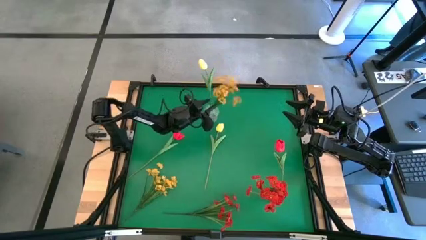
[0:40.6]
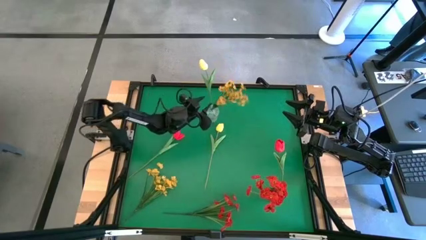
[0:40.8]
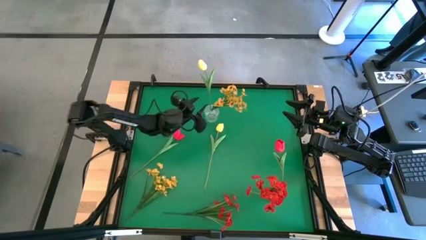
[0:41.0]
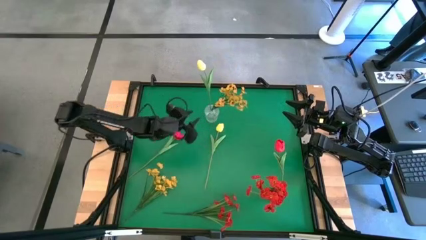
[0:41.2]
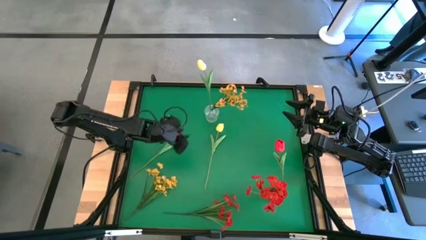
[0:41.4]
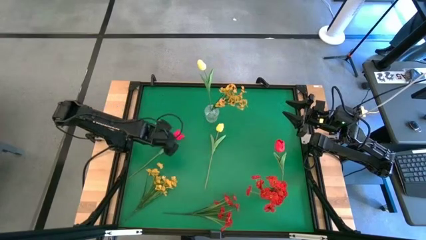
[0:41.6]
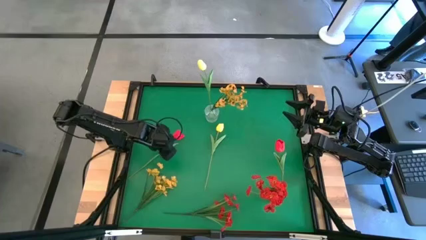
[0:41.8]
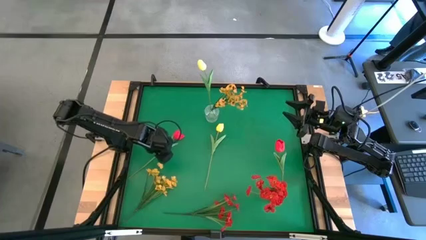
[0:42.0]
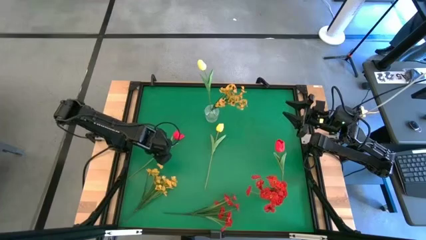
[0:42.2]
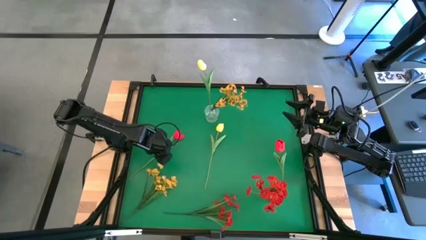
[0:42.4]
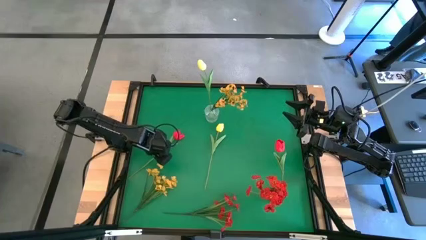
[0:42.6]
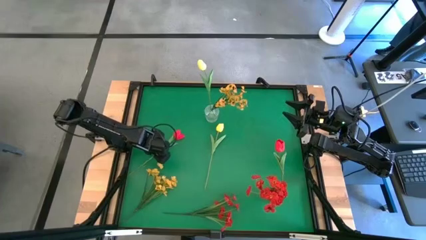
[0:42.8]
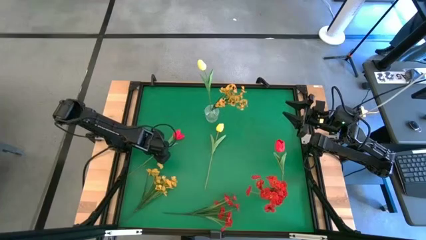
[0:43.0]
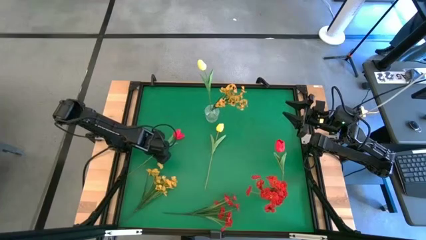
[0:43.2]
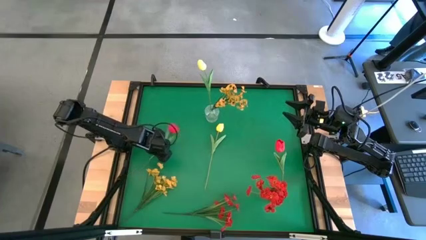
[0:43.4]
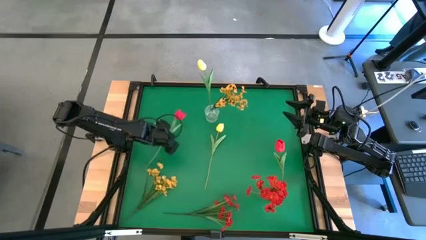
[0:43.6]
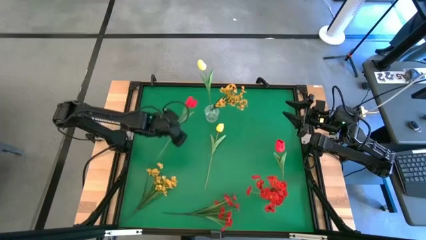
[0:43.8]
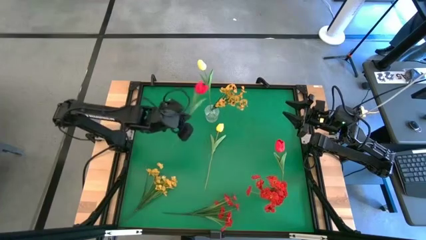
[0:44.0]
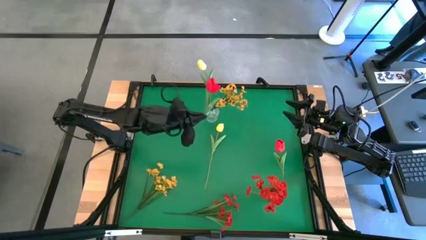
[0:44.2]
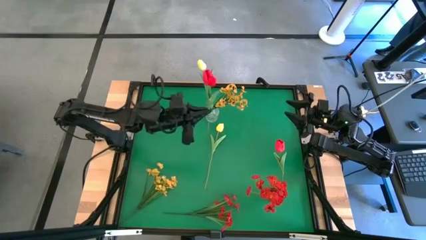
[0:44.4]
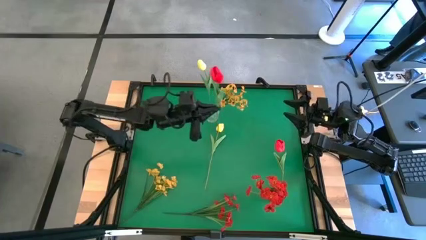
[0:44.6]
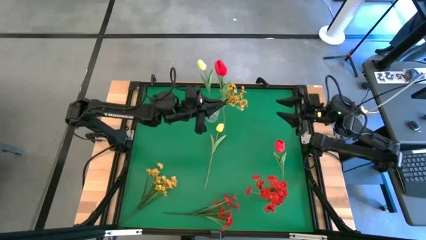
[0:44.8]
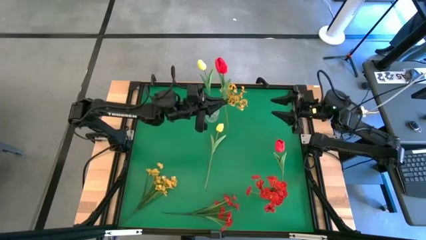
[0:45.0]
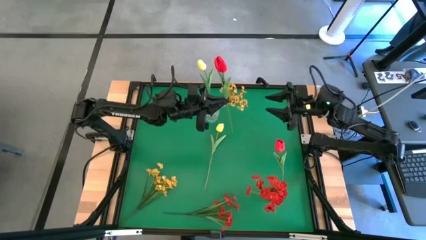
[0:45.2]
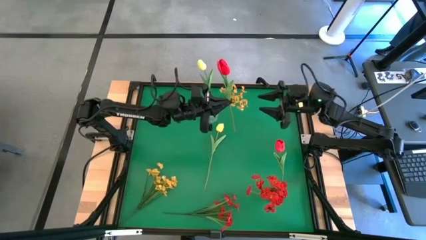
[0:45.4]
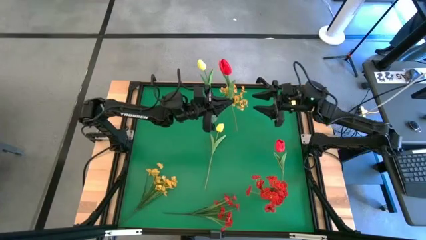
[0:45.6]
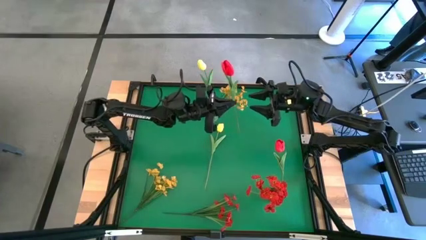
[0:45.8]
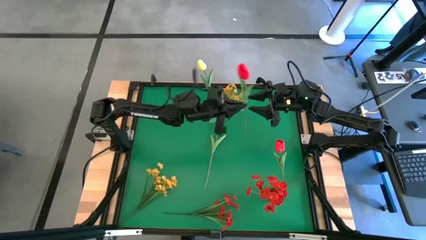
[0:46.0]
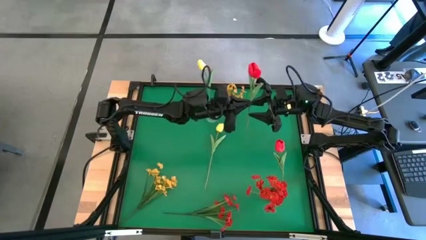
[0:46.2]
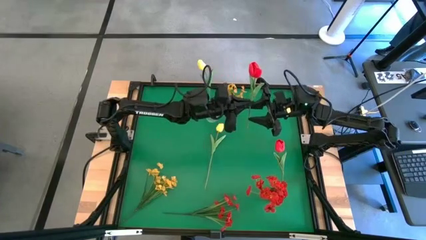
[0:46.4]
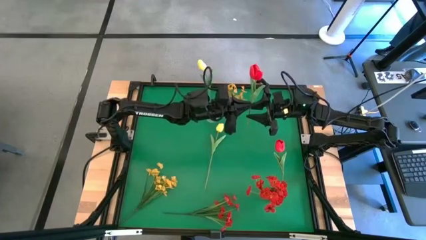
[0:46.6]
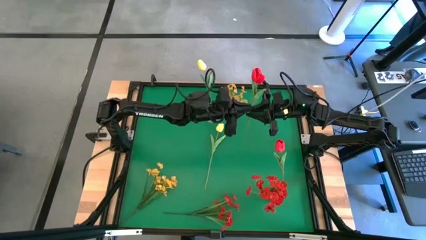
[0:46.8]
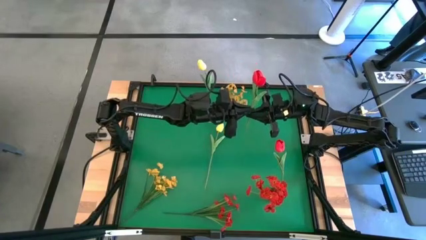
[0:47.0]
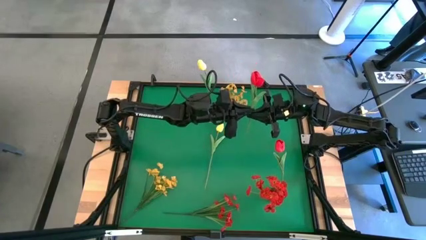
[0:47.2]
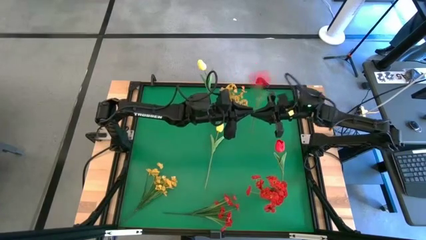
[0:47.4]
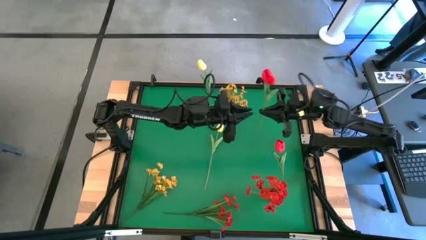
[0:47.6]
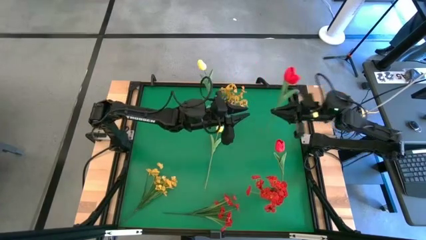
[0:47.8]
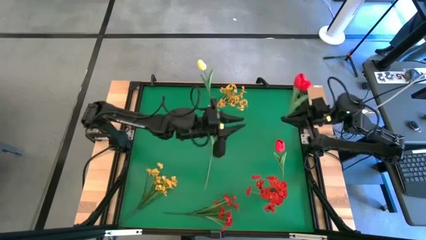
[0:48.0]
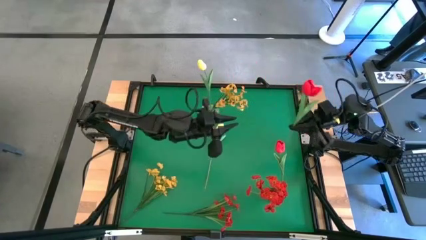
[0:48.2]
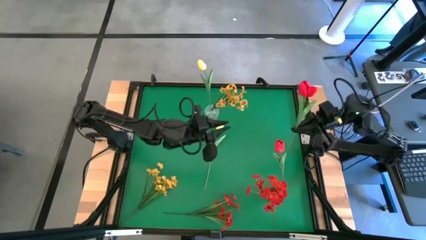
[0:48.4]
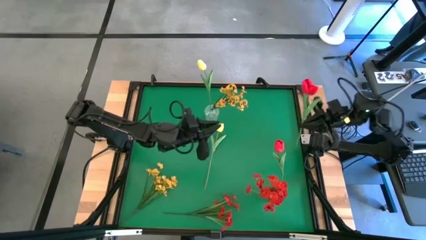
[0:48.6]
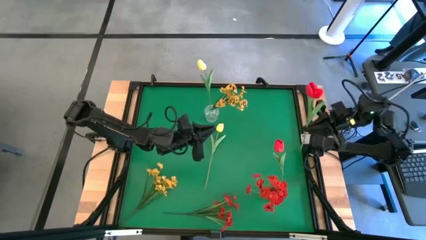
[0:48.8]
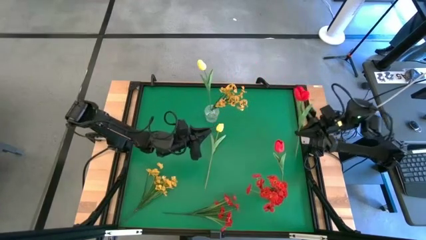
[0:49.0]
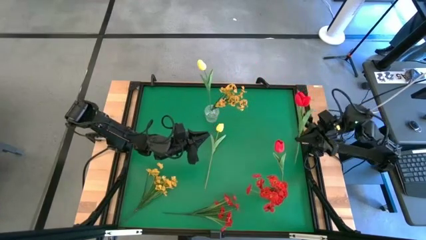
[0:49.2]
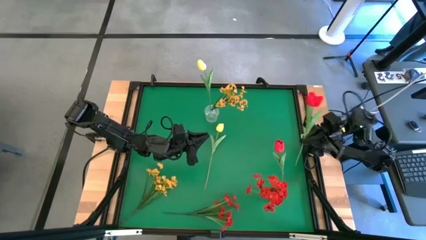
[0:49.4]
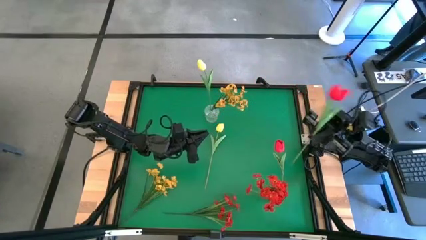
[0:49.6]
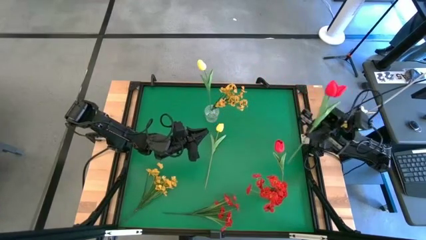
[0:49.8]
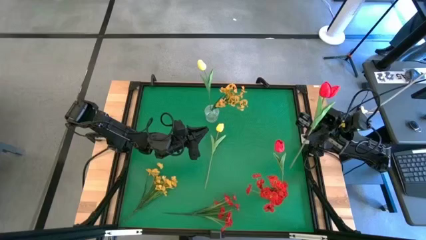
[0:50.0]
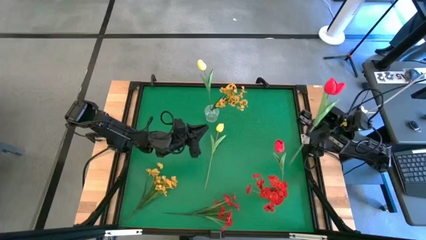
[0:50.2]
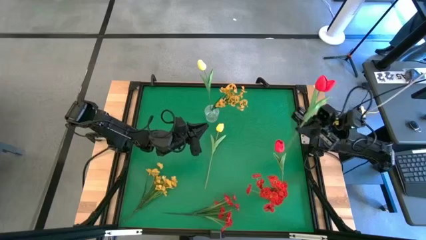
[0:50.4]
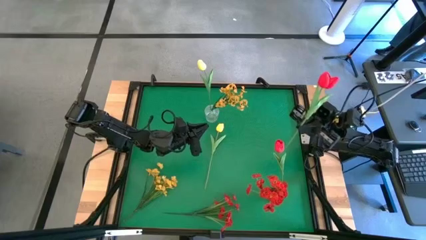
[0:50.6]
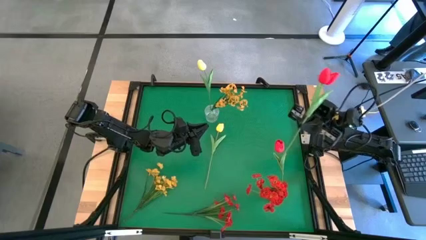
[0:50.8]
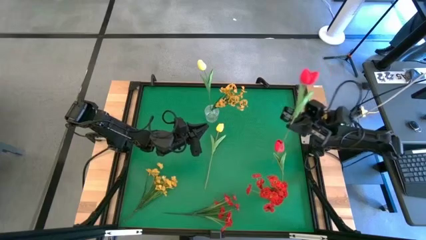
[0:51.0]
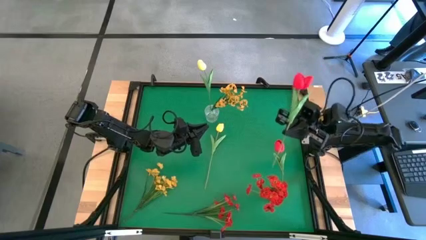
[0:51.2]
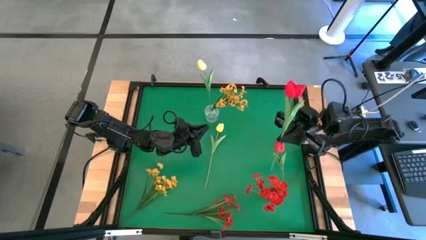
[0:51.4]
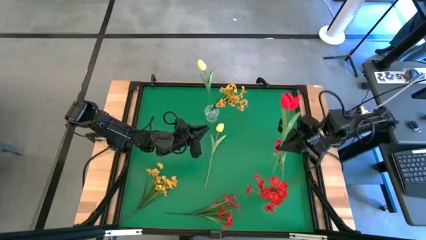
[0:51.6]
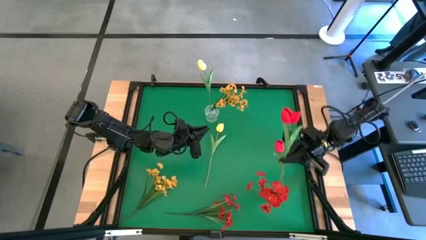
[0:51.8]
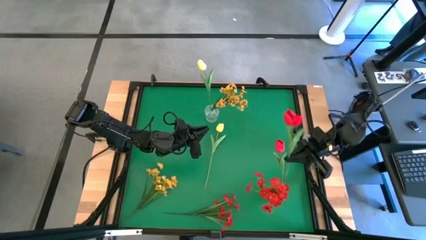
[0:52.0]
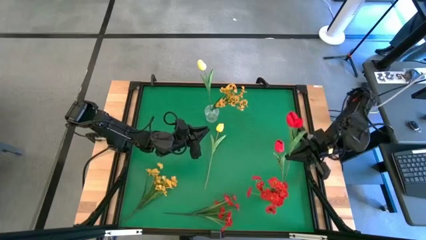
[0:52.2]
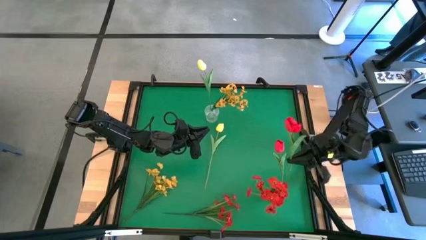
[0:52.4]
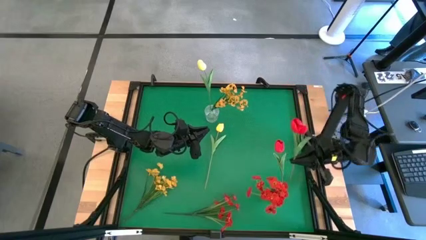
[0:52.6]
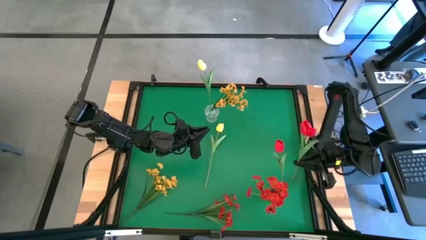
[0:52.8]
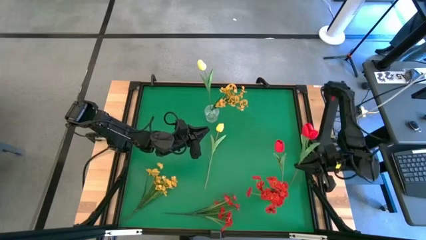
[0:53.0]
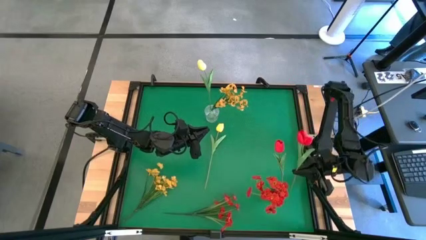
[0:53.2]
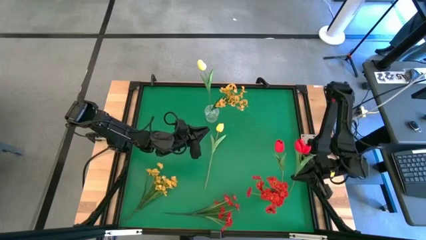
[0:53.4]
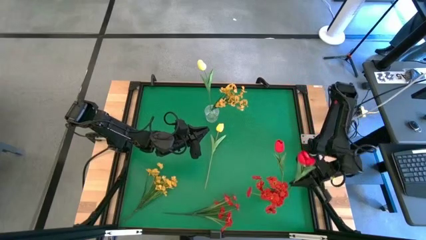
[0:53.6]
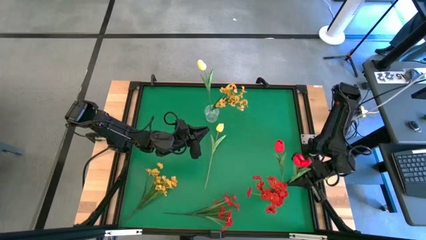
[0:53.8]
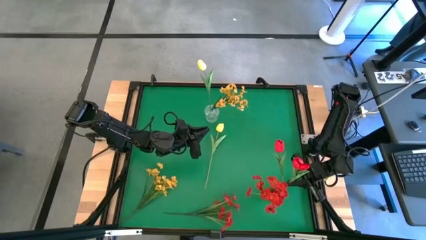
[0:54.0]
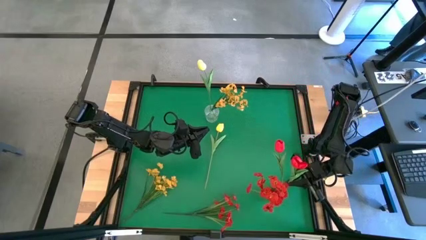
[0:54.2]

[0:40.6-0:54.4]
Task: Sort flowers into vase by color
Put the top red flower into the red vase
